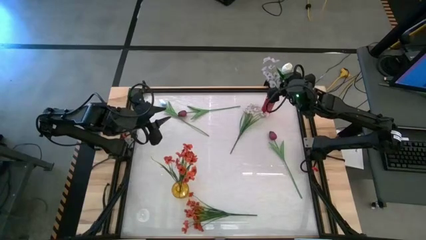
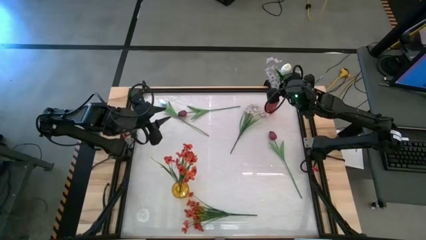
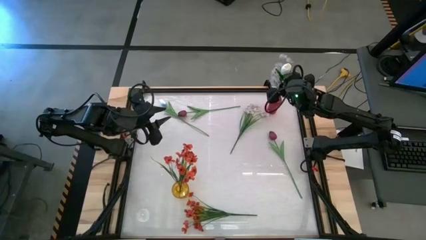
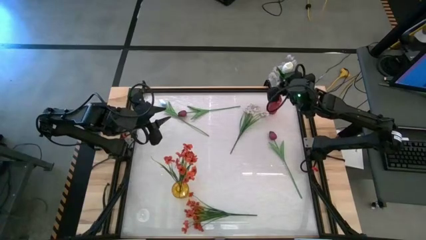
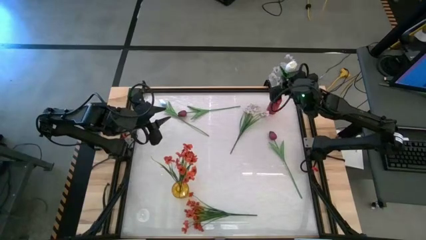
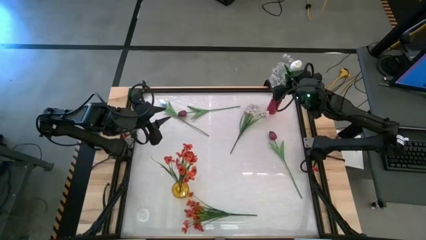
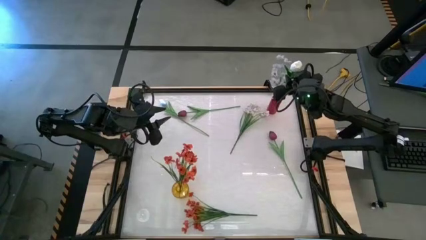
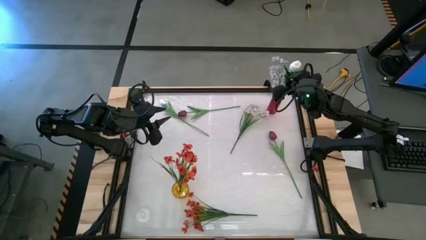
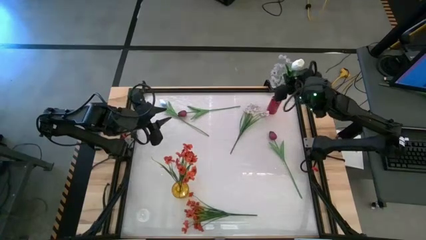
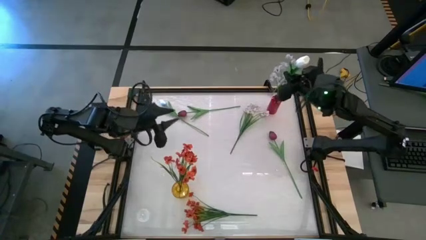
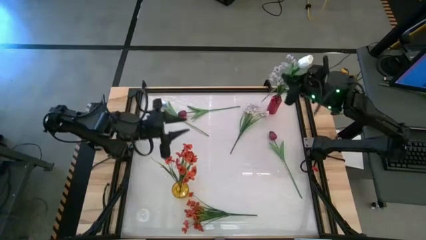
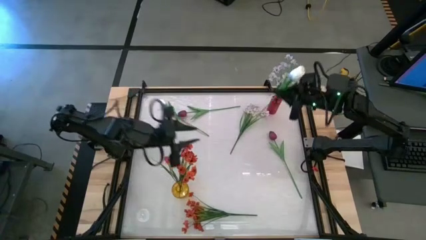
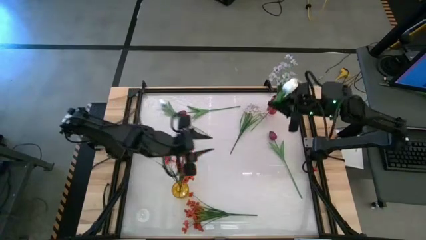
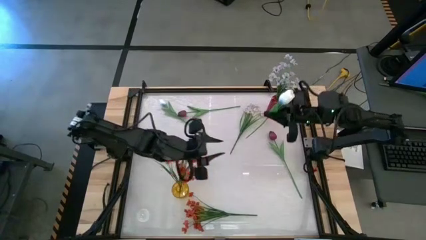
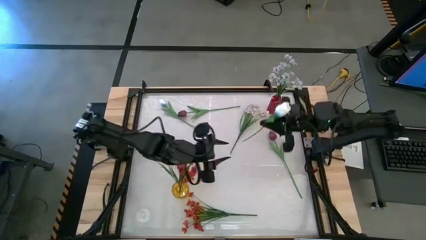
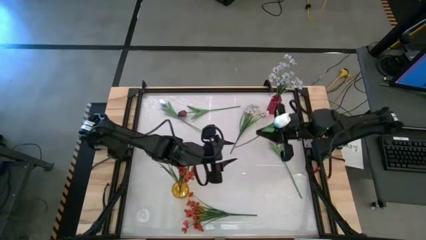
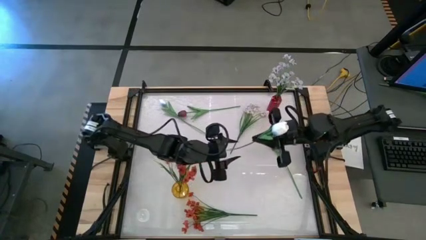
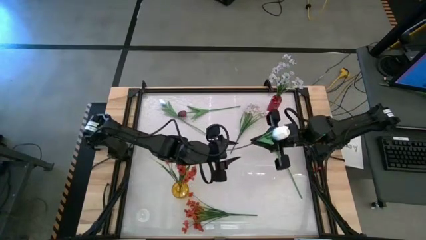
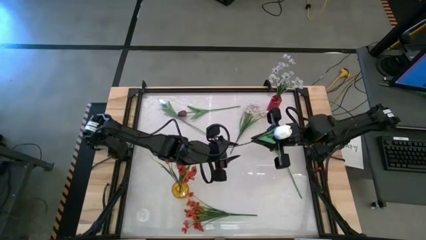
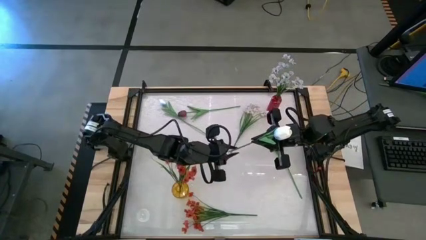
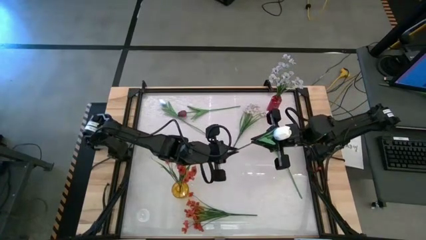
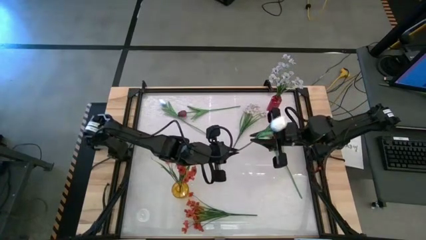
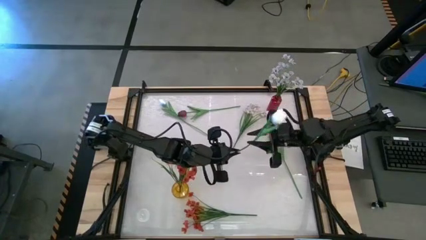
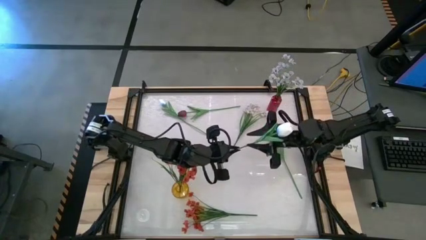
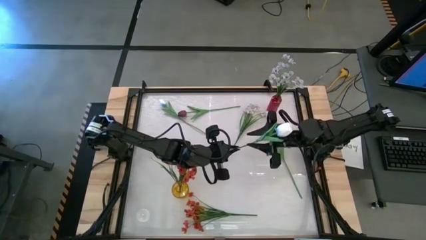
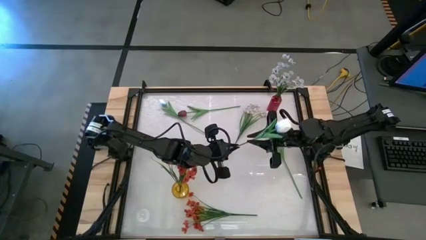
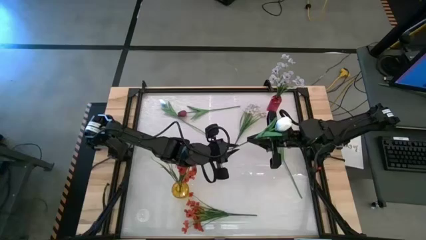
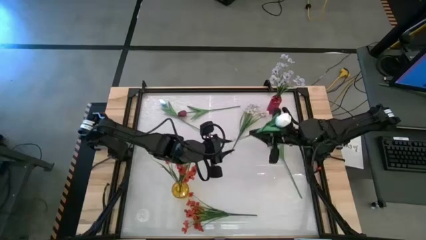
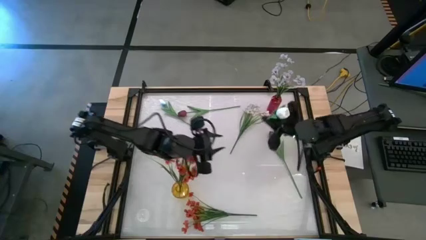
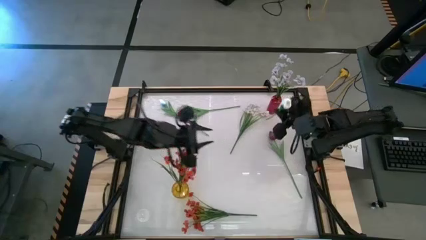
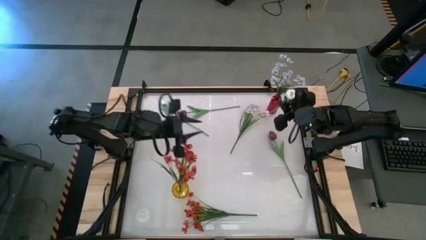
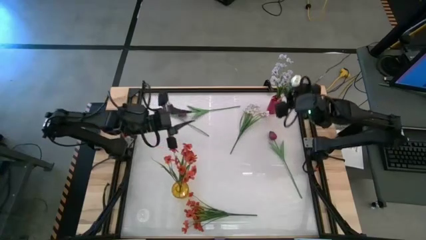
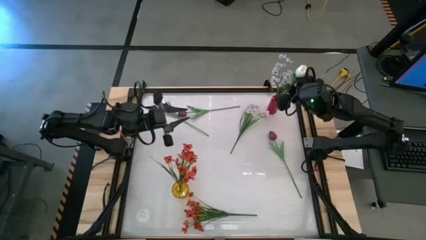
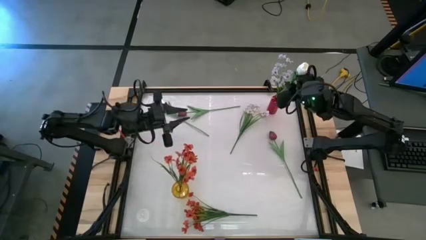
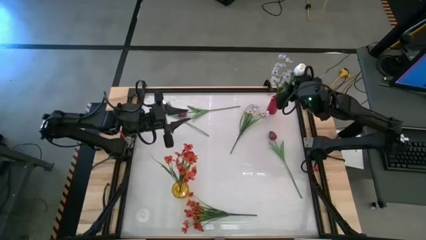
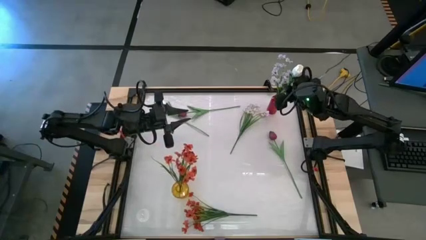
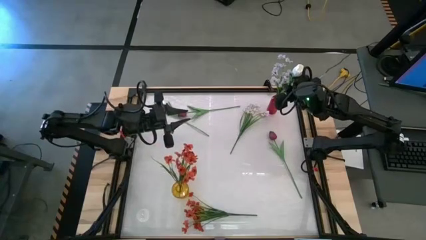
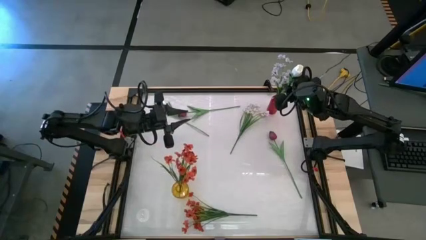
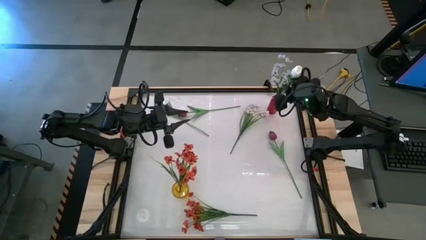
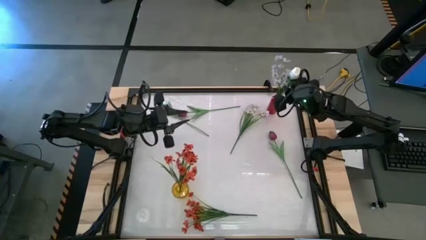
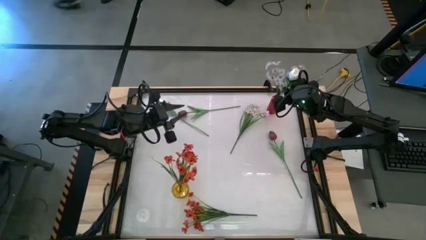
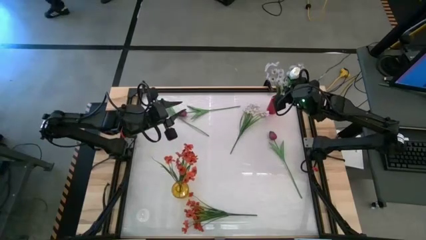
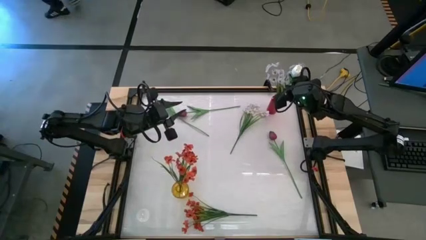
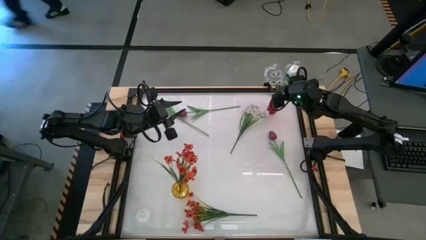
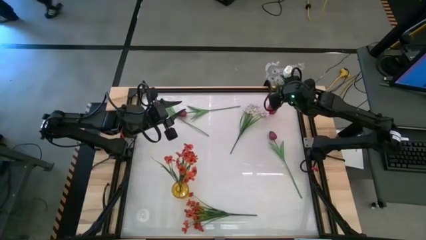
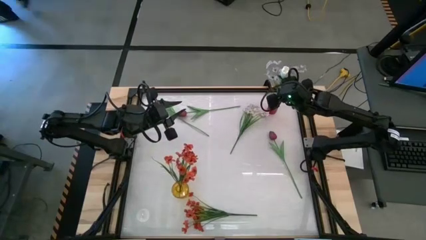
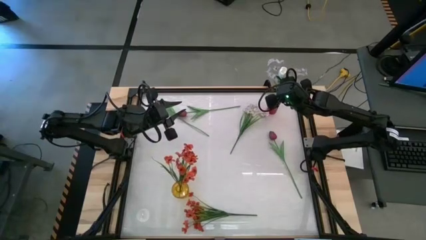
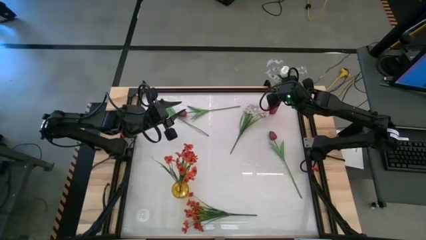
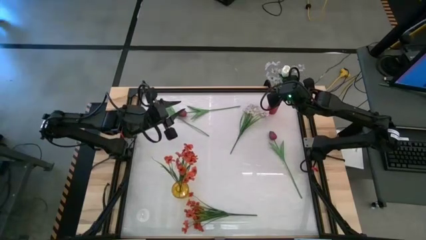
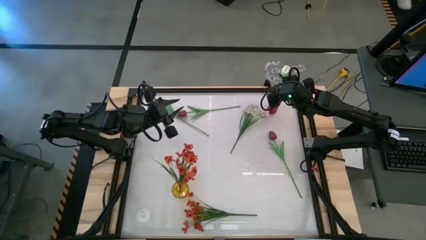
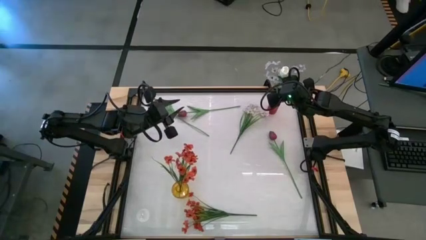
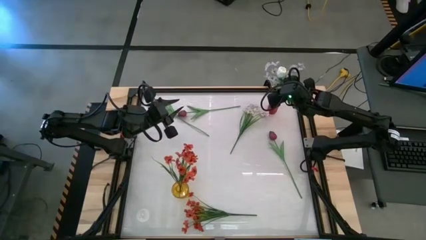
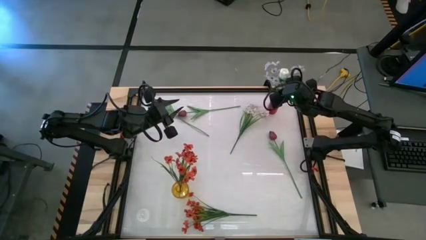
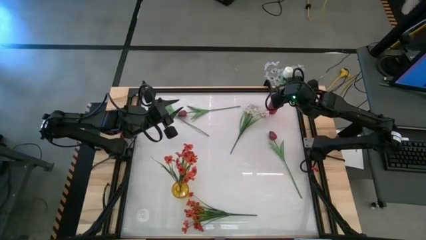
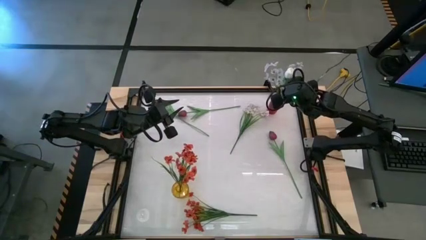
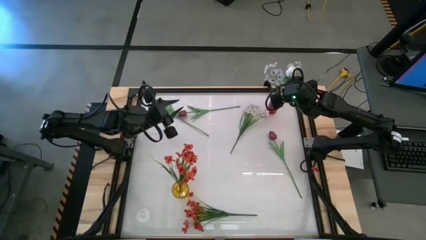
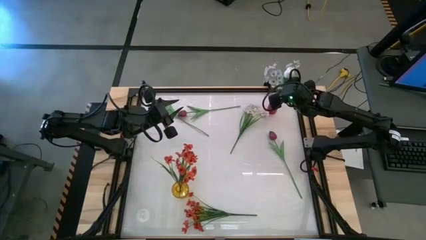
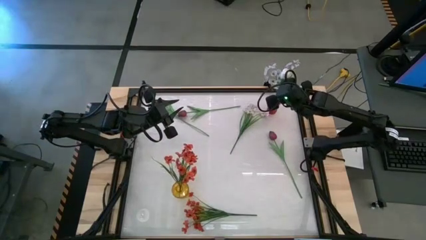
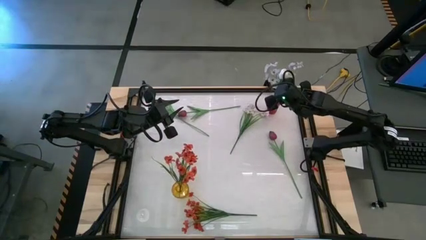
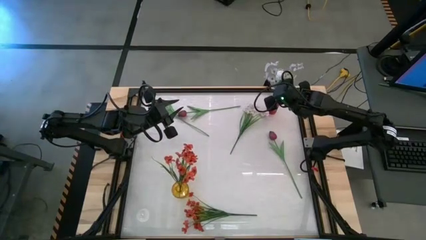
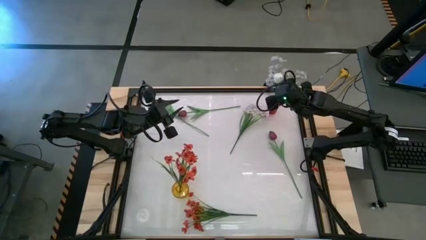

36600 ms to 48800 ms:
Task: Sort flowers into vase by color
Put the bottom white tulip into the red vase
